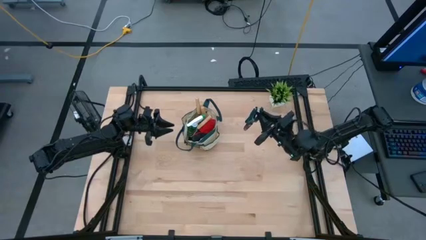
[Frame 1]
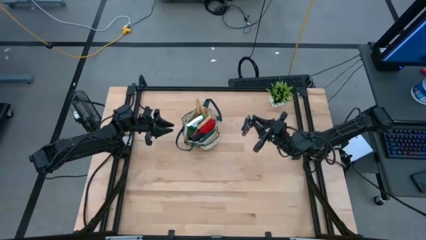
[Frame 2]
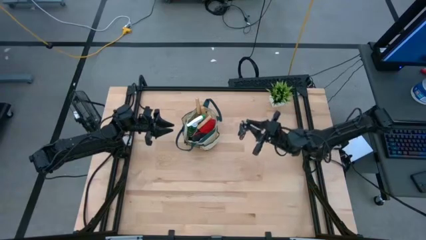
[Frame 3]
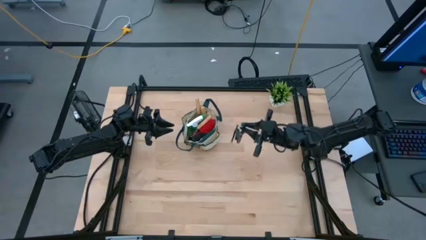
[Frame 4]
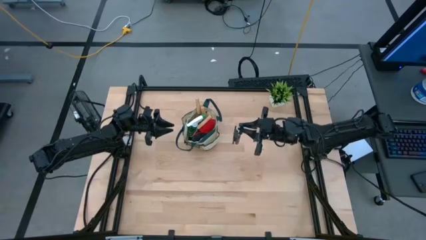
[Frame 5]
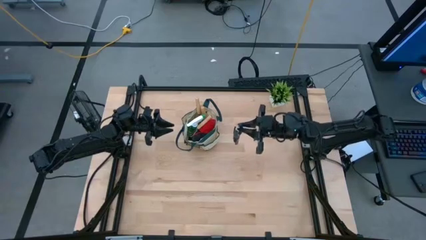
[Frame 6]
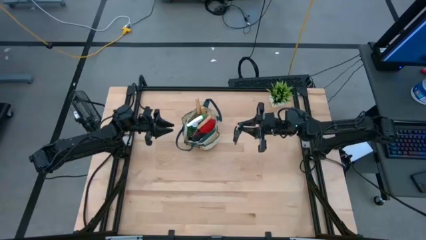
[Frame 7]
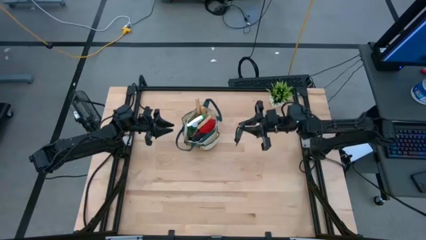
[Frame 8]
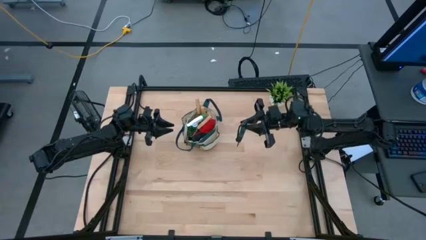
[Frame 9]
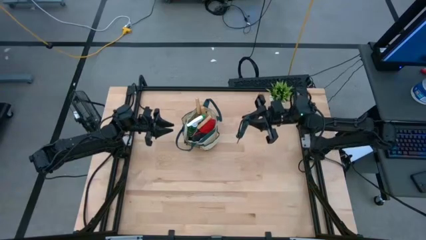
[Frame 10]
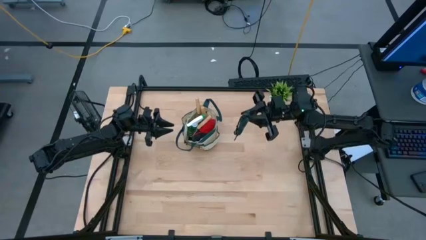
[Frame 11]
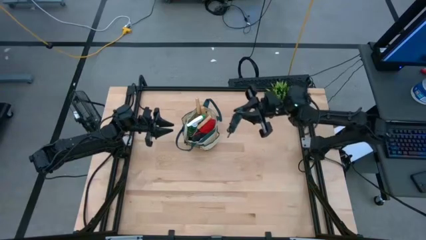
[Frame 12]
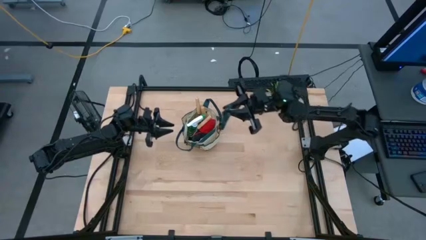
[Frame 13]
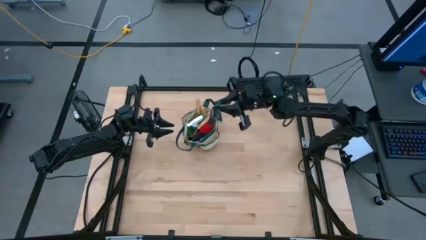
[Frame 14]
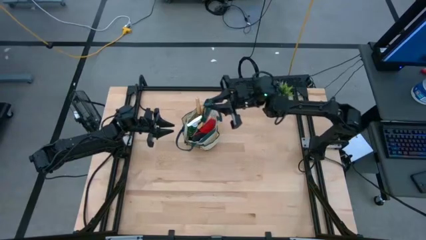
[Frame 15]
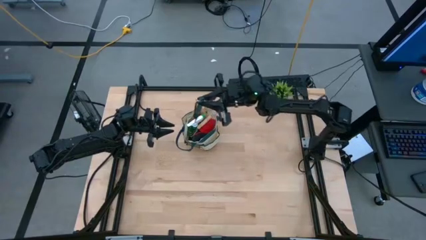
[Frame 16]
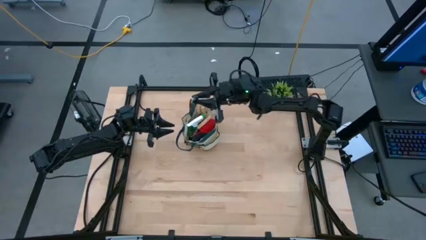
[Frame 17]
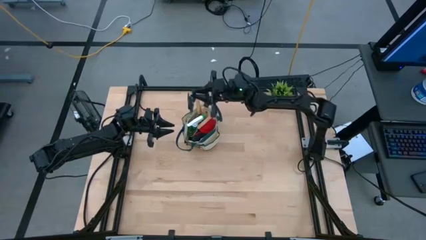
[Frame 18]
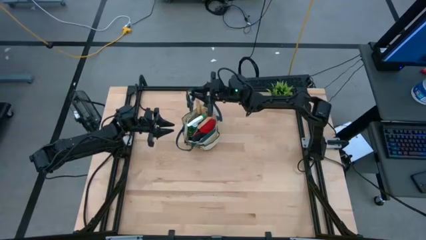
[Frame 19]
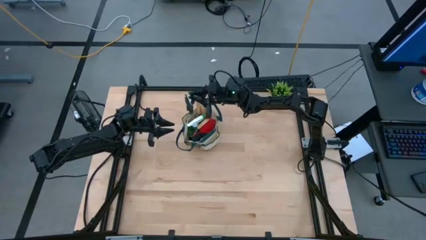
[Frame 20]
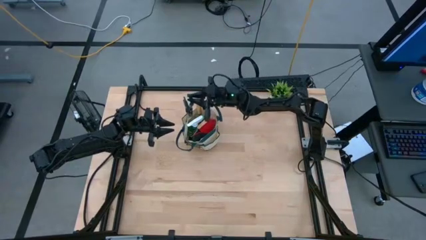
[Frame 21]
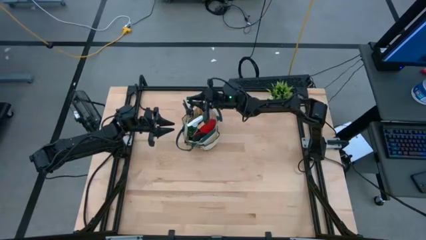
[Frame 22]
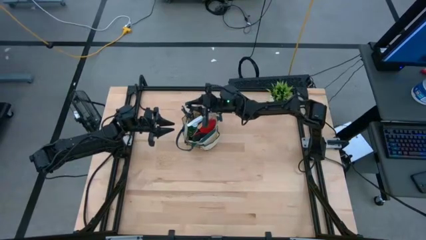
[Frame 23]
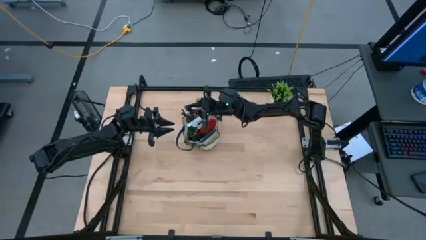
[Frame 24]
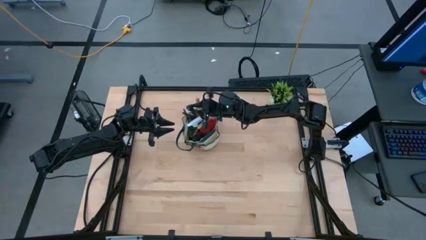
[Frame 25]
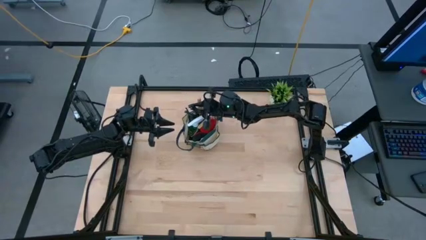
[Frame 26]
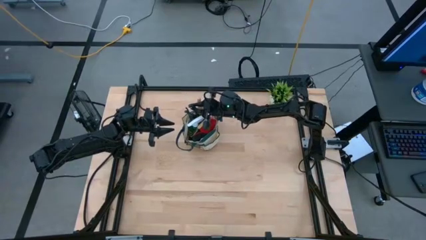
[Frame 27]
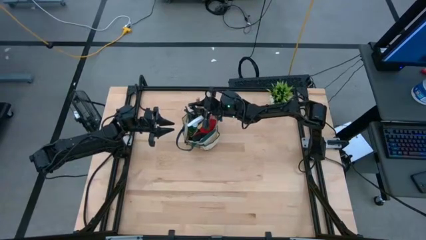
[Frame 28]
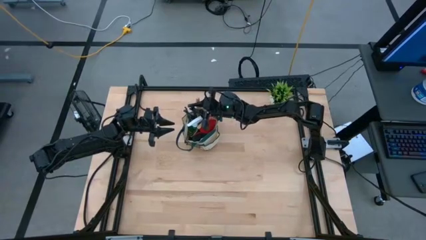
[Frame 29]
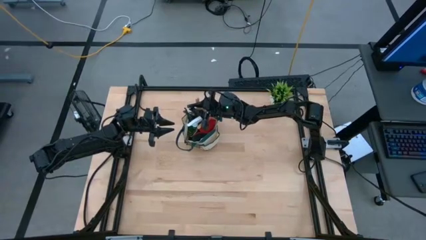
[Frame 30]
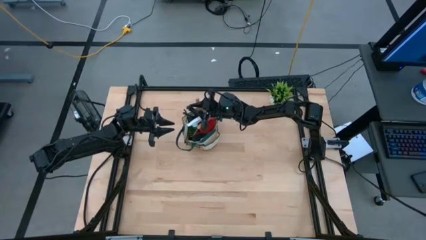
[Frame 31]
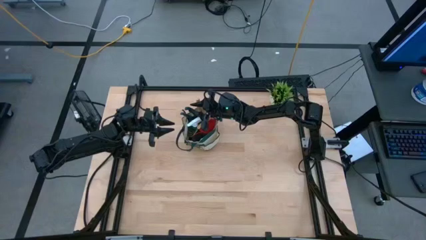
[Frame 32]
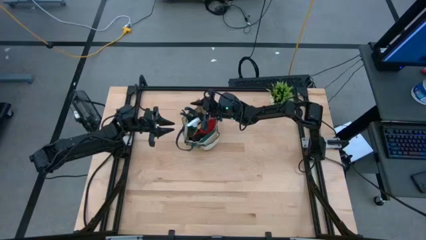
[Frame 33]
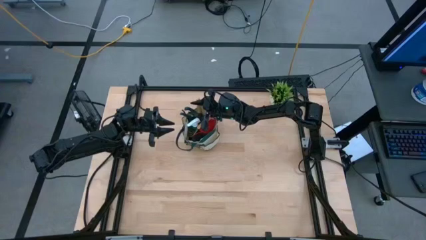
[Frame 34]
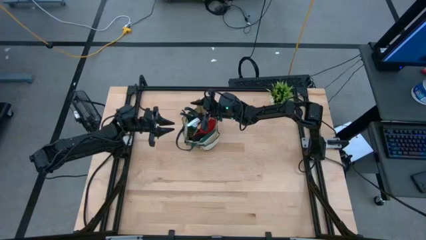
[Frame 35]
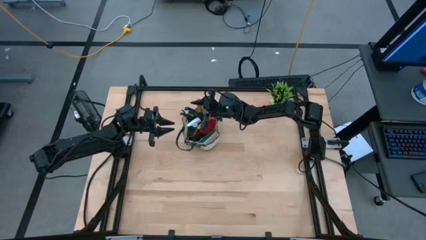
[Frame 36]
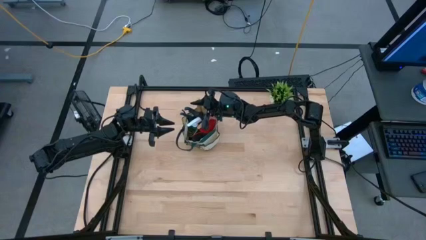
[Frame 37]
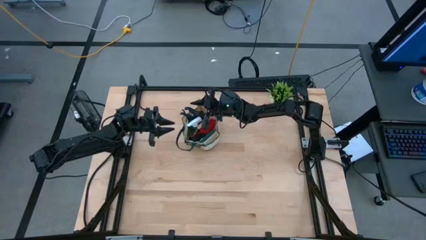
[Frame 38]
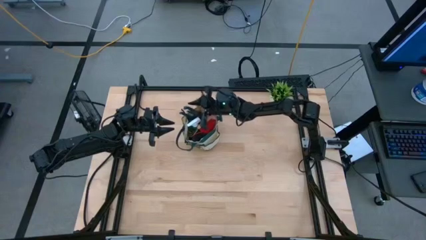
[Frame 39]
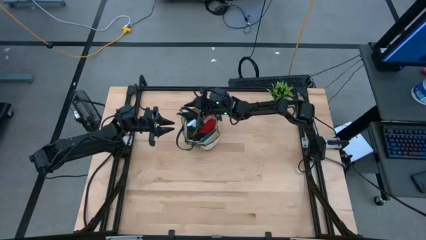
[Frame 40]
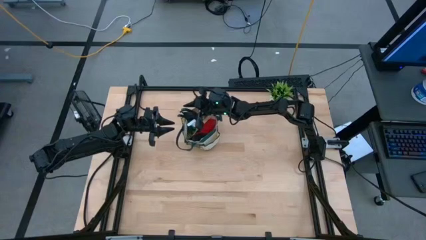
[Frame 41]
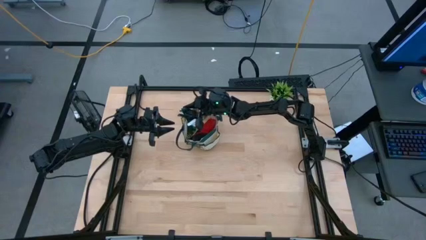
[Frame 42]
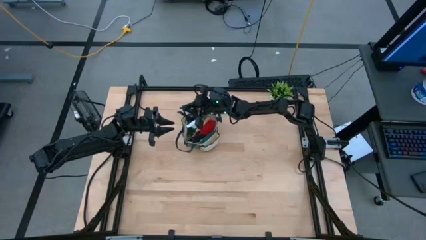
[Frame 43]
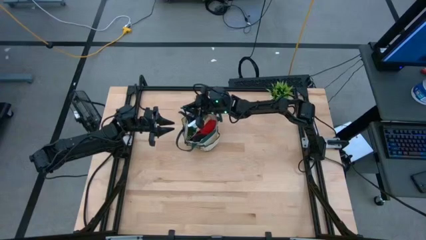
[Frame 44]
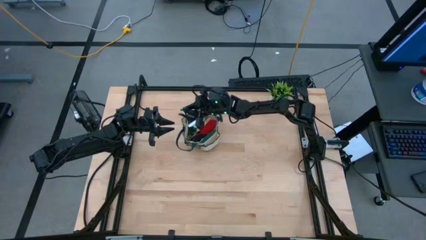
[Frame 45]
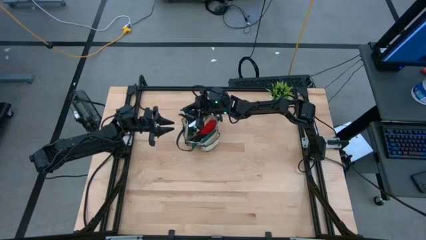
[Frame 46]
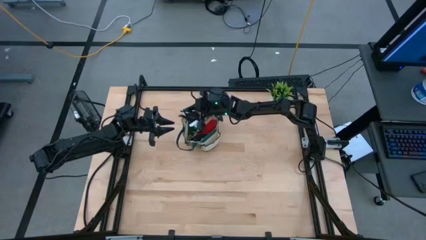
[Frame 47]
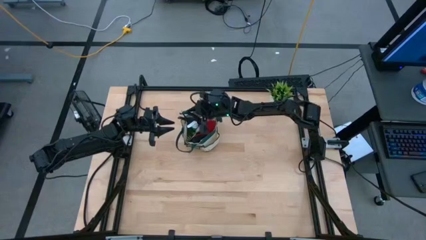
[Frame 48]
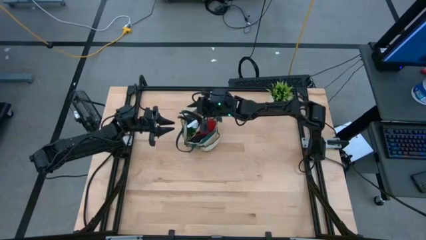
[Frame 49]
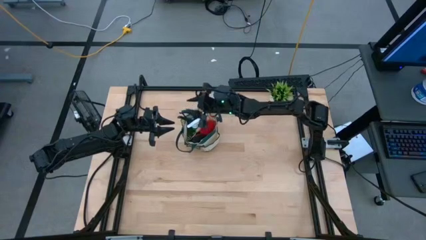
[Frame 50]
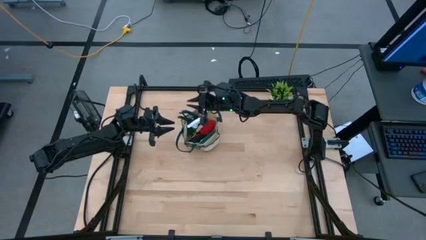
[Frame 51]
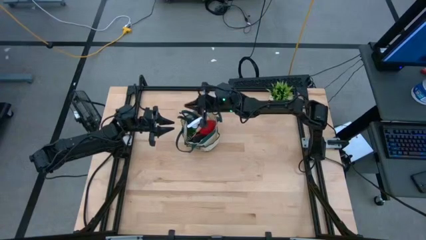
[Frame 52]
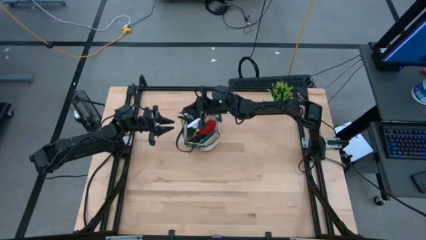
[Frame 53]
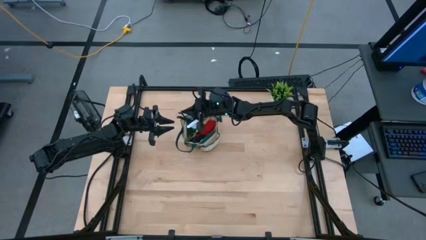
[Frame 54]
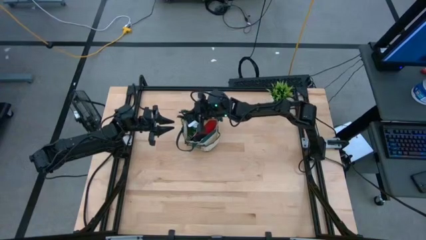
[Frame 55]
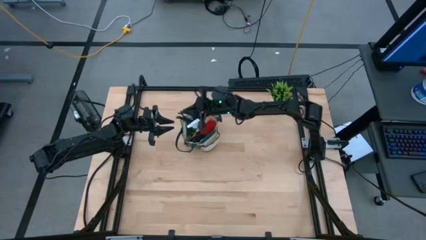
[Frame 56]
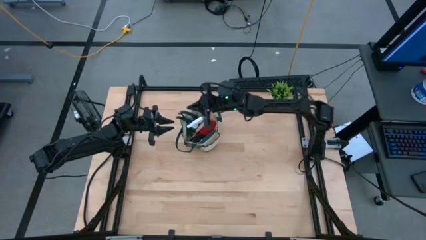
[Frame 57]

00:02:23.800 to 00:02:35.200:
Task: Pick & Place Garden tools in Gardening bag
Put the shears into the gardening bag

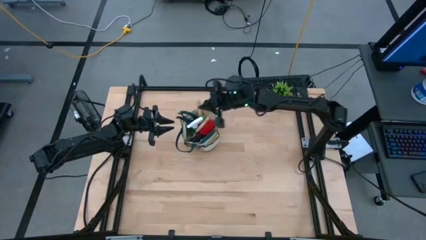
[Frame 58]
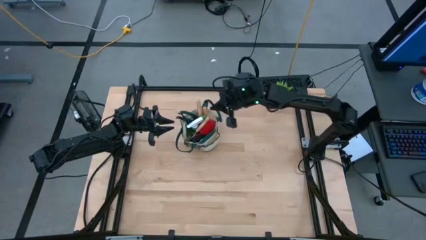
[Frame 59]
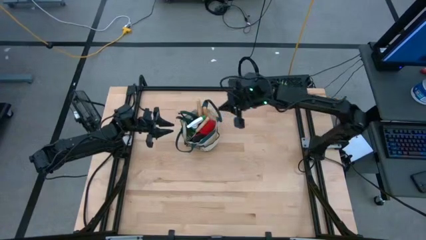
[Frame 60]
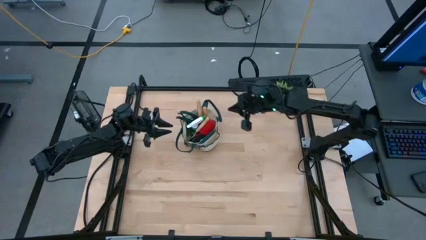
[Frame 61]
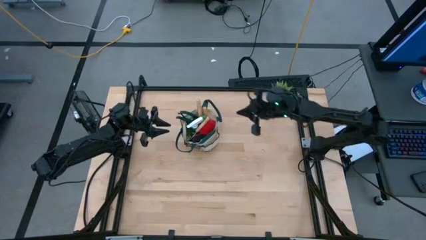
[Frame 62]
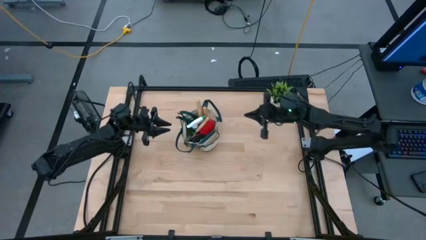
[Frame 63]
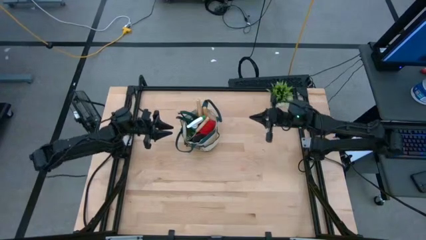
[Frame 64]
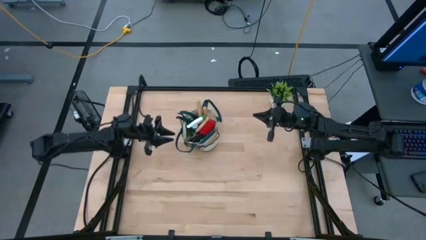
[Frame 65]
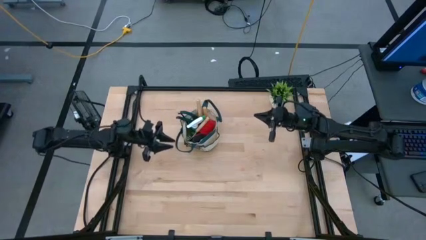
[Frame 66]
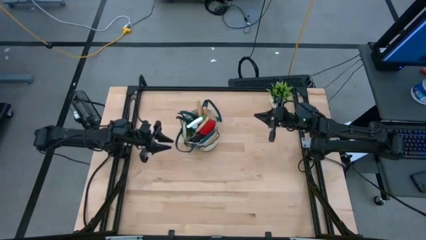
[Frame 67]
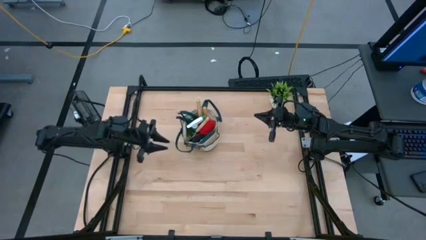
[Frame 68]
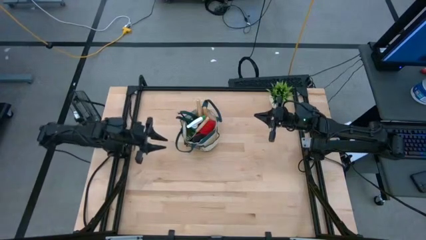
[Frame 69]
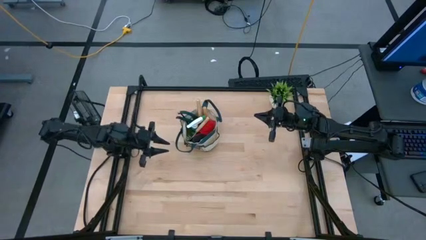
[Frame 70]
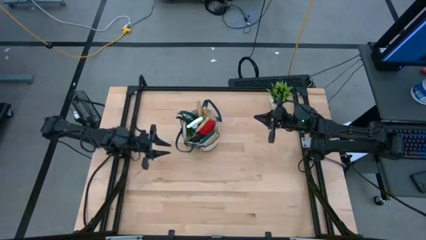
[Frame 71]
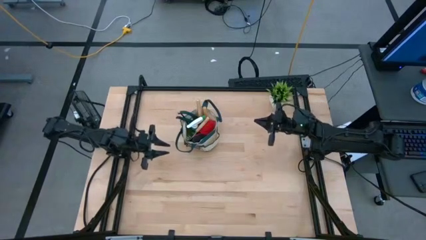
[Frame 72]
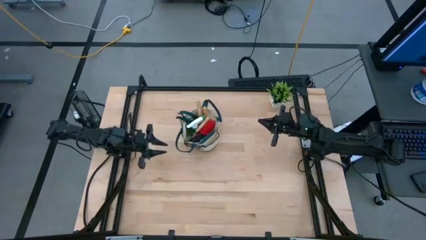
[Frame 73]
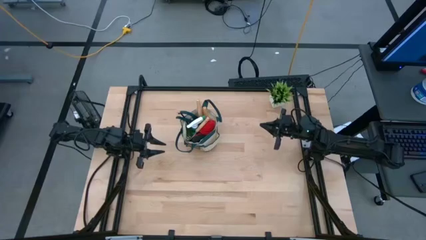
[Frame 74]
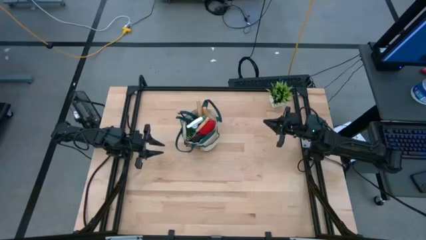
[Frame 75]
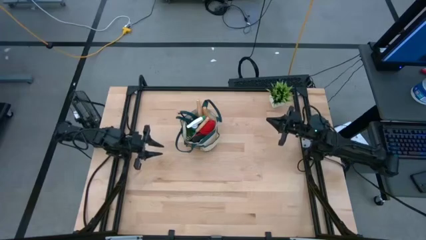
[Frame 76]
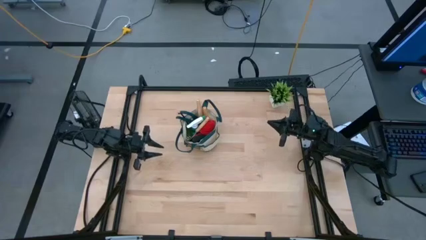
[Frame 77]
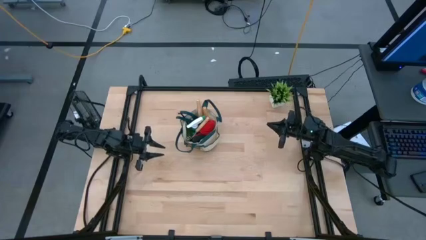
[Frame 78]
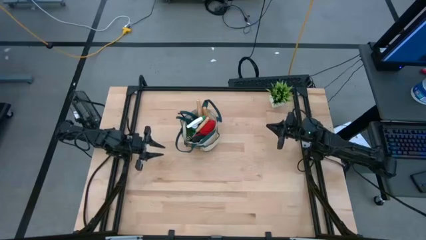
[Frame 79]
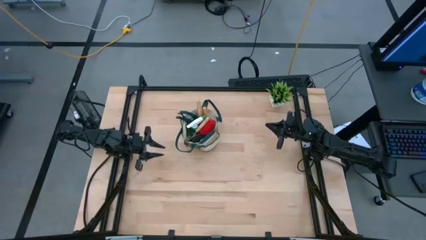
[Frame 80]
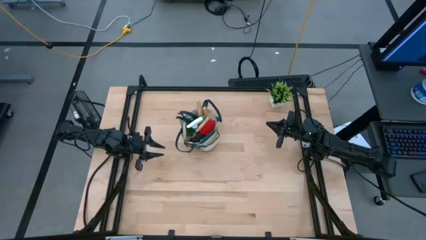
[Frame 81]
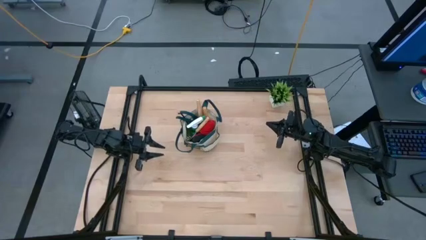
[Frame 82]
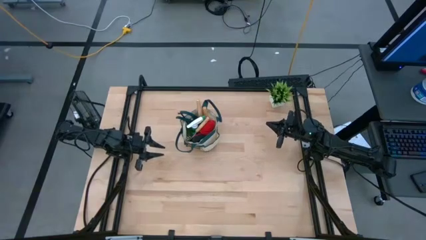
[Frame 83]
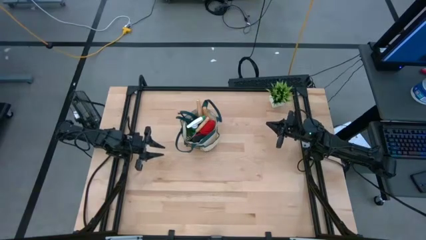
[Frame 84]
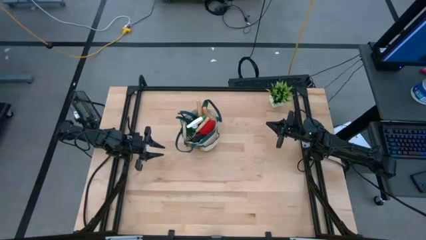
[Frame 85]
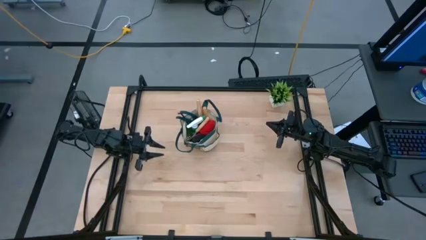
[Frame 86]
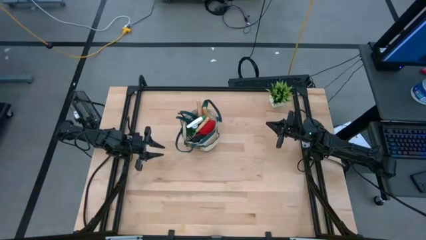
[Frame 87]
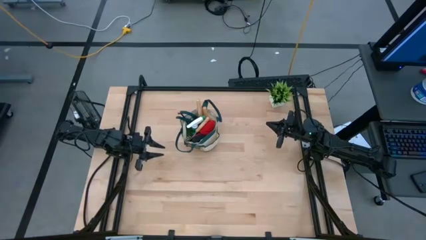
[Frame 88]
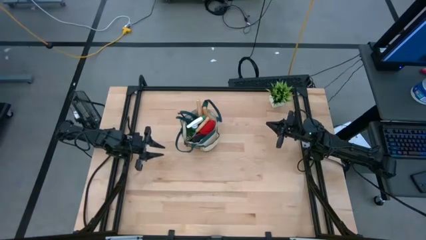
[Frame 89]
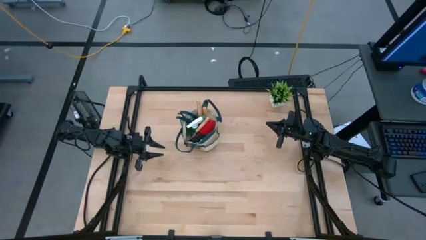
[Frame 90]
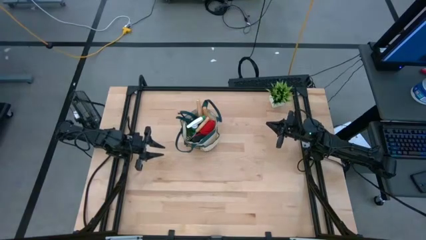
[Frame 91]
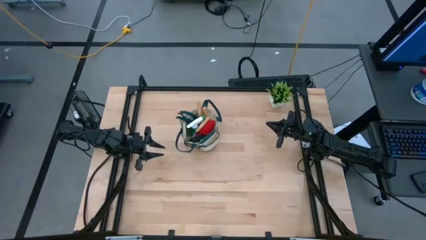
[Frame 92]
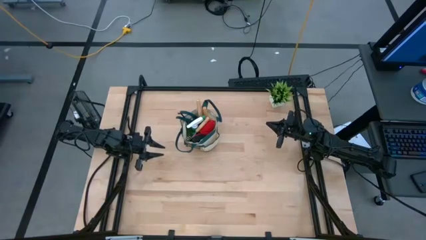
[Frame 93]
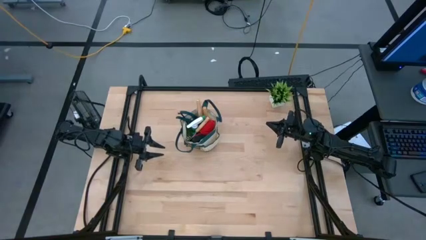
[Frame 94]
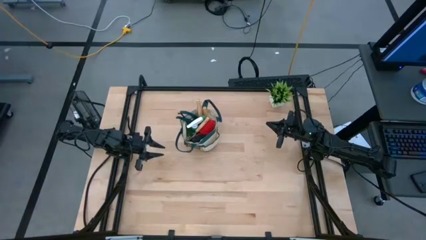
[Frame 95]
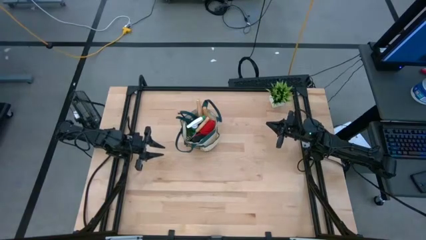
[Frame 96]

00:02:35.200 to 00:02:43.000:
Return to Home Position
